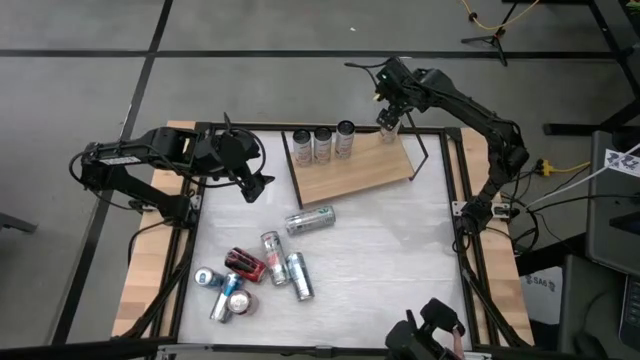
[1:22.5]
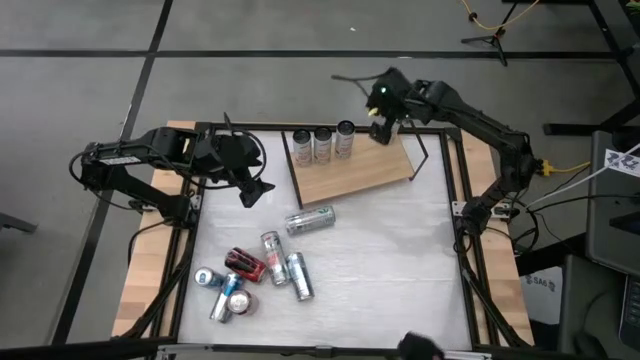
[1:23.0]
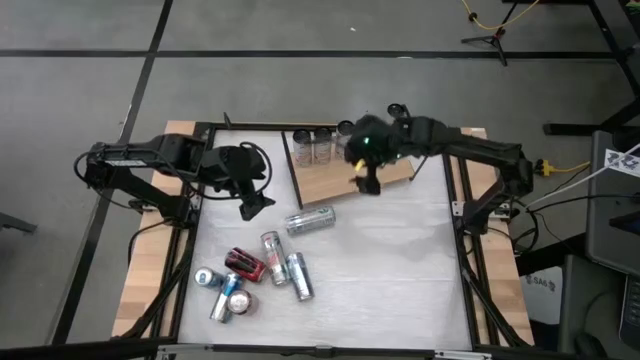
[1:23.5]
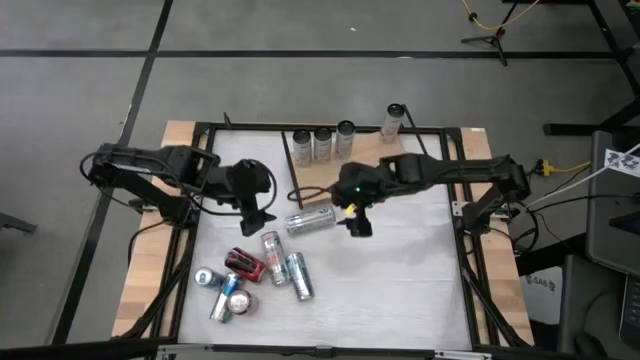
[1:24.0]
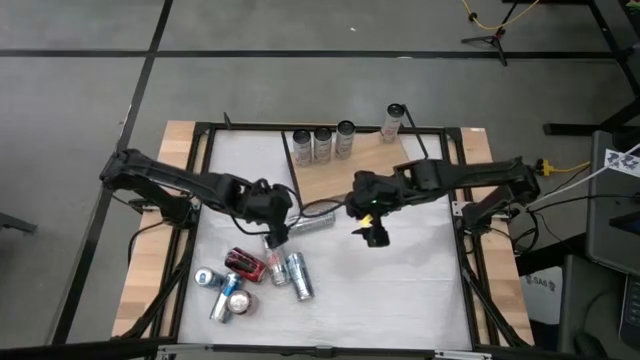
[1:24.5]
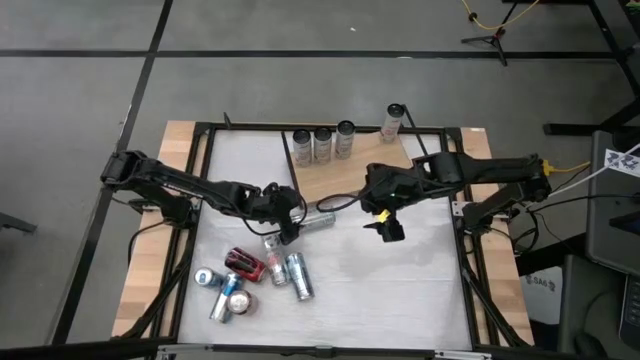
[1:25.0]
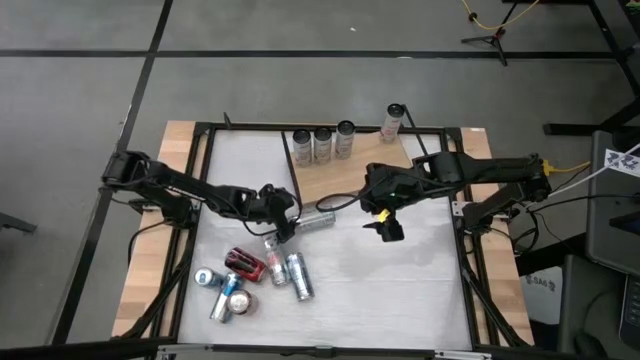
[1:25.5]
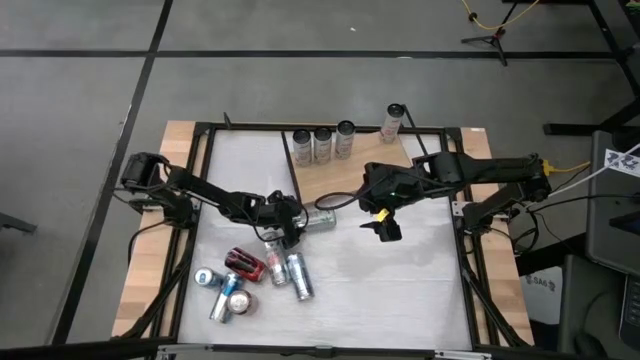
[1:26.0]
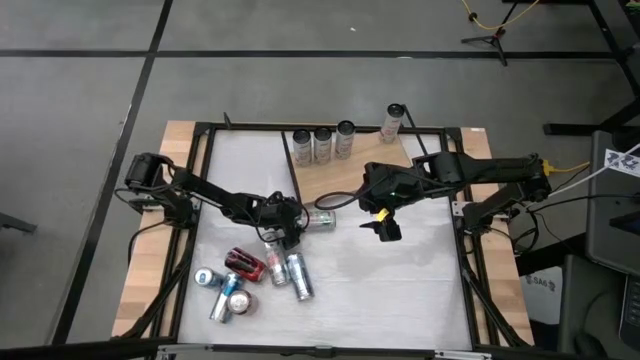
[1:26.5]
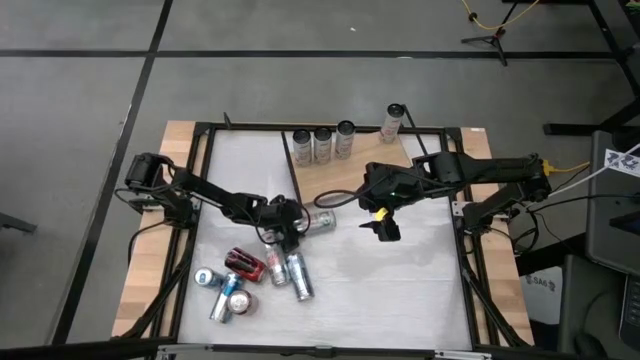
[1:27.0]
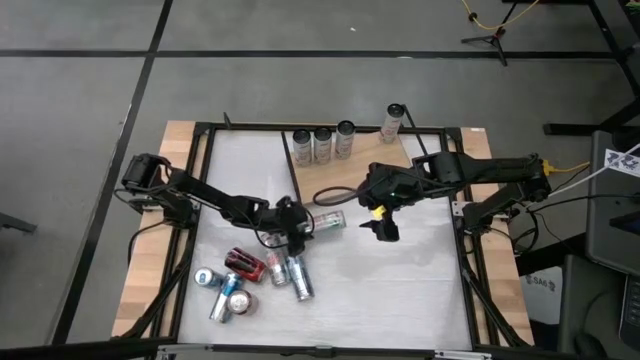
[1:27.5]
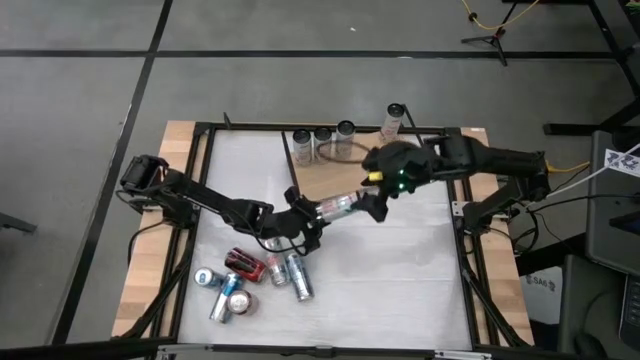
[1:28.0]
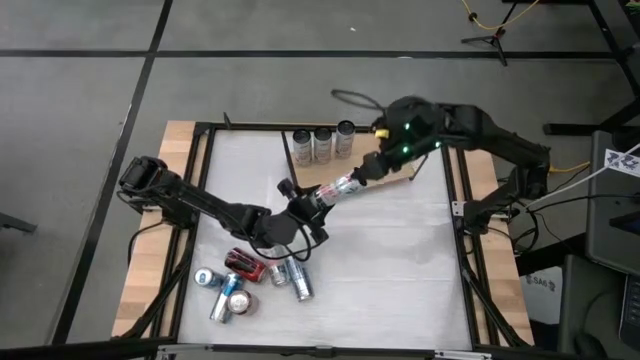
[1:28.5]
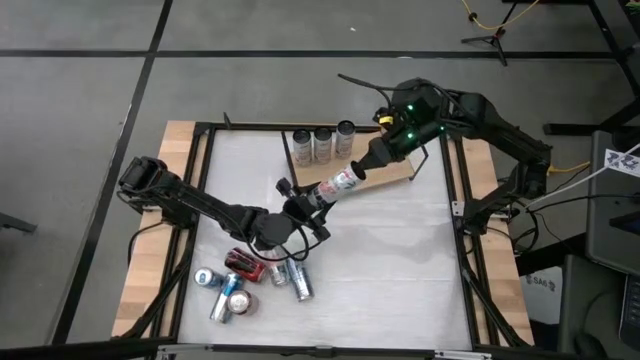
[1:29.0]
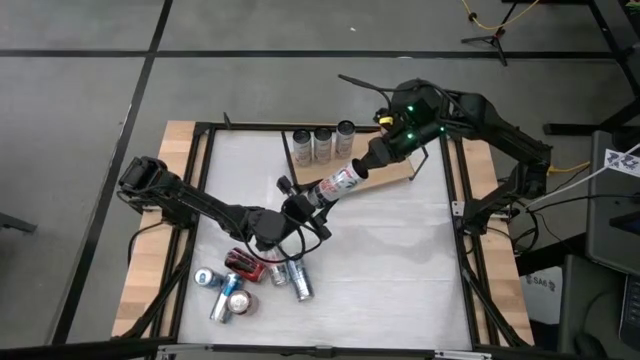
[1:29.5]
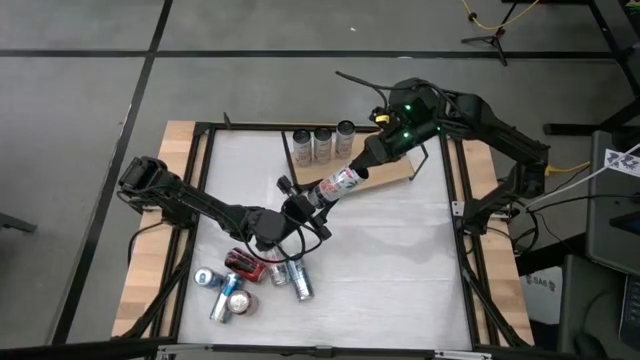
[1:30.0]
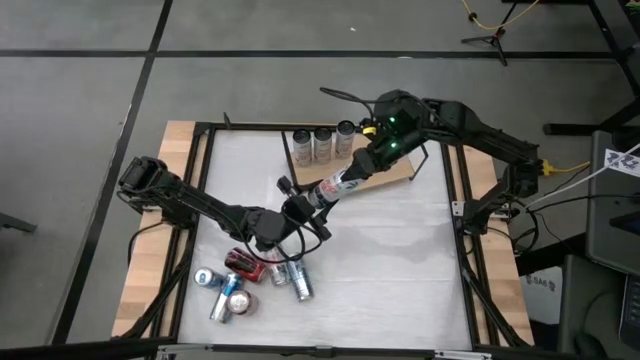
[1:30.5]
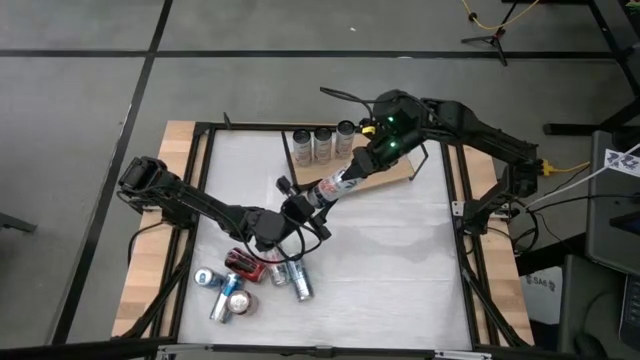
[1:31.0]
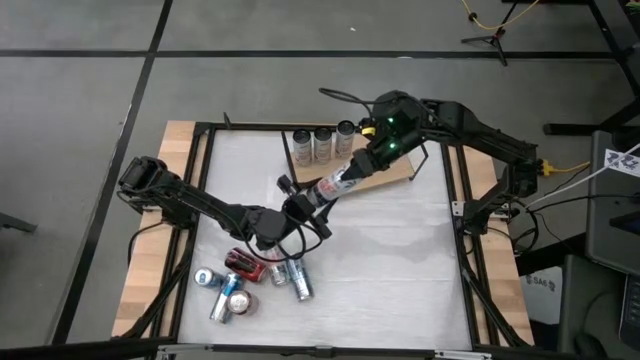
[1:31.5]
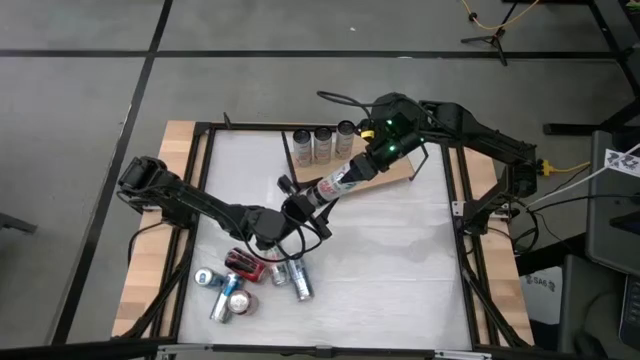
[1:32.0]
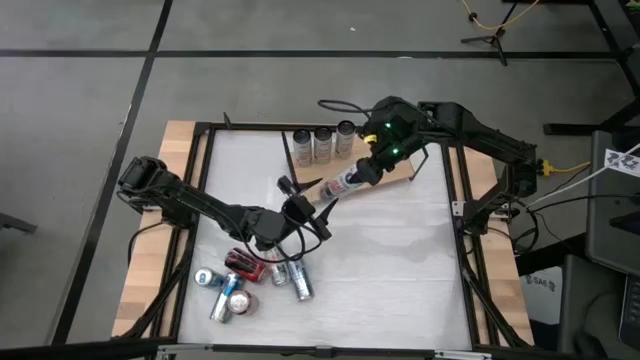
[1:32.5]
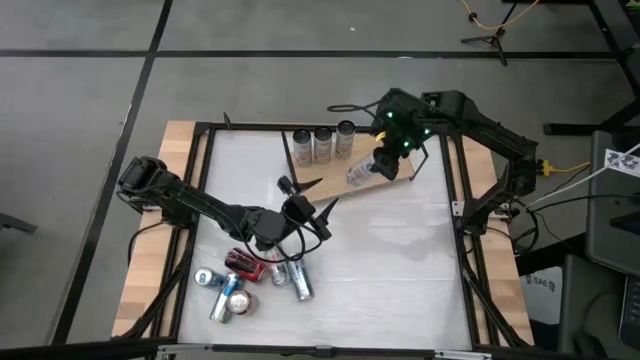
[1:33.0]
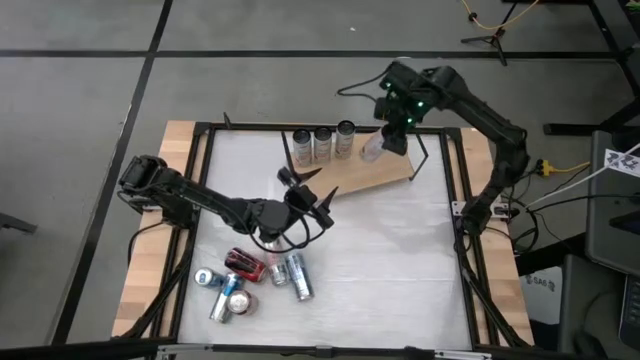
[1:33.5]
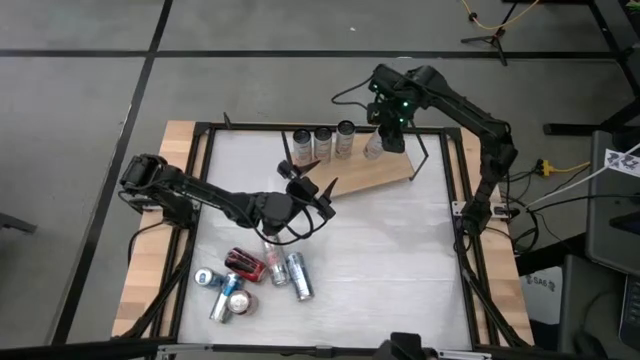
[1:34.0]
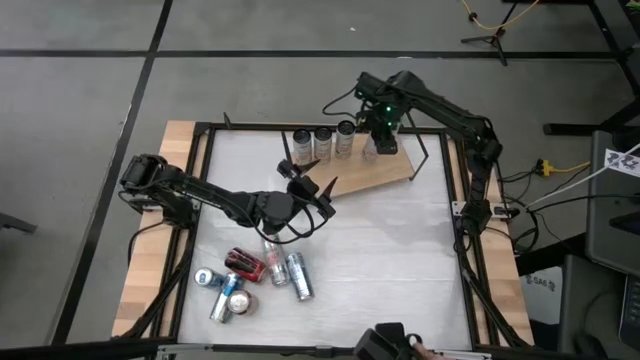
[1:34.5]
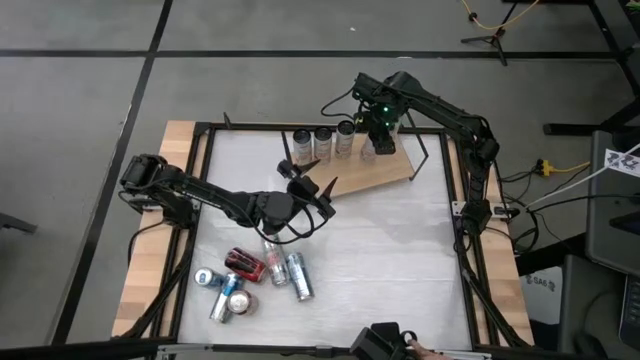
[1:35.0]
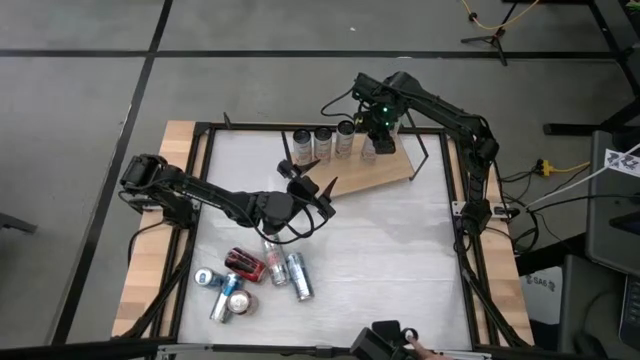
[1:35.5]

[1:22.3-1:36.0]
Task: Place canned beverage on shelf
Put the white pink soda can on the shelf aligned with the other white pink soda cans

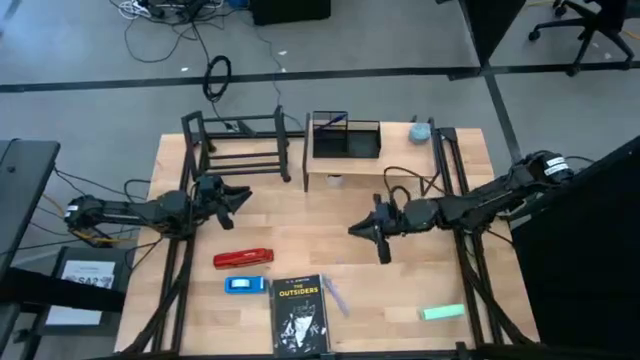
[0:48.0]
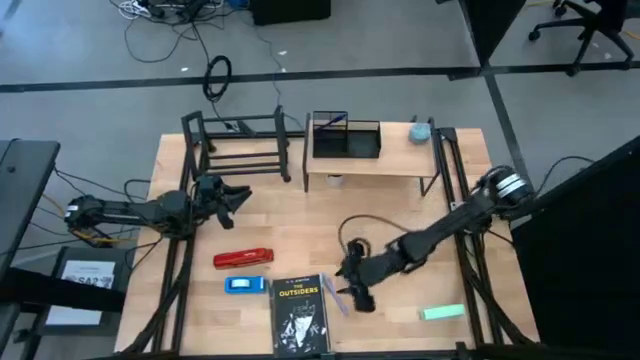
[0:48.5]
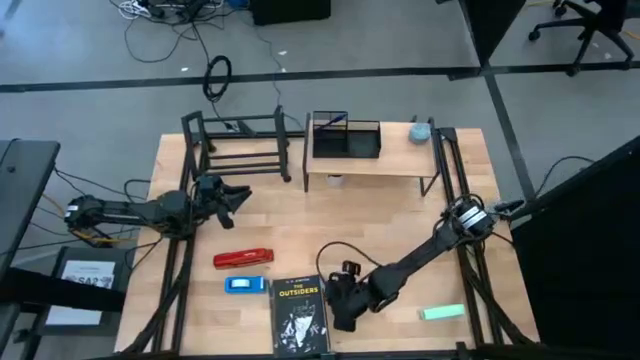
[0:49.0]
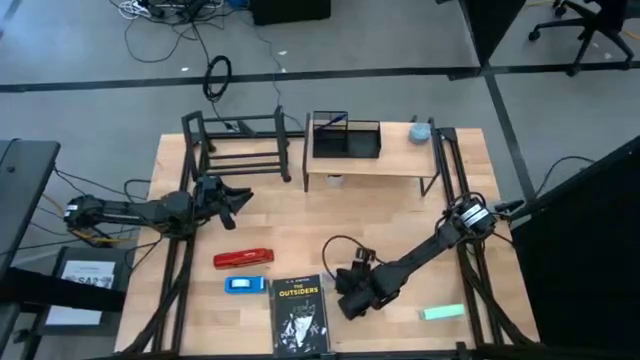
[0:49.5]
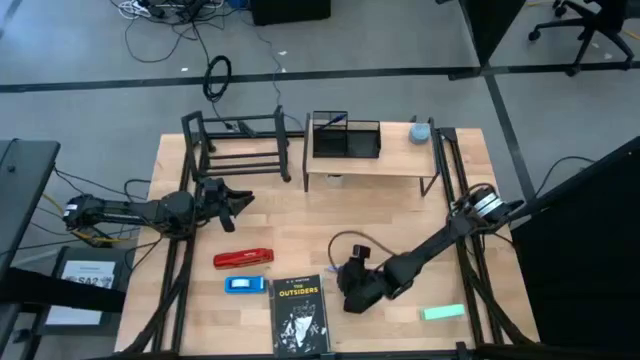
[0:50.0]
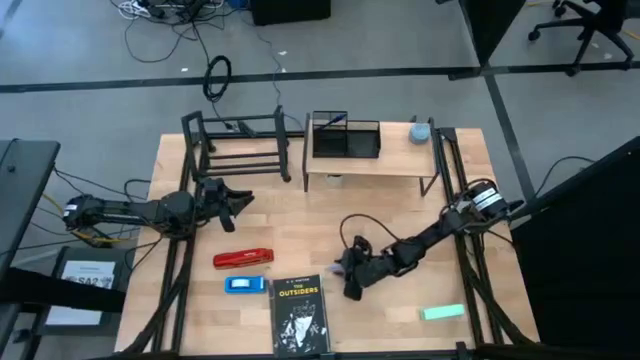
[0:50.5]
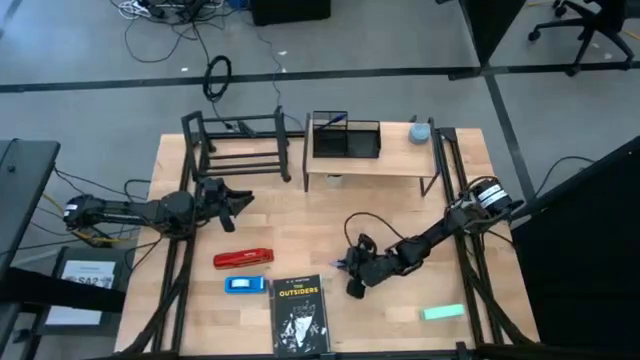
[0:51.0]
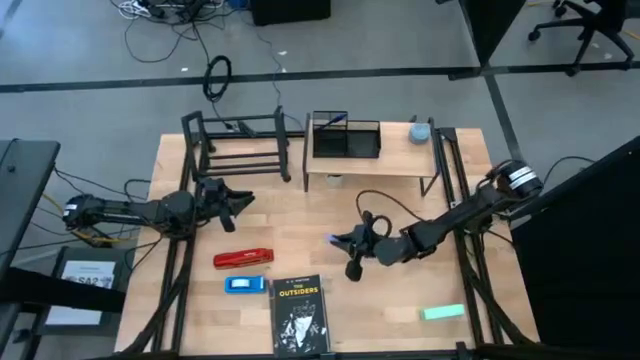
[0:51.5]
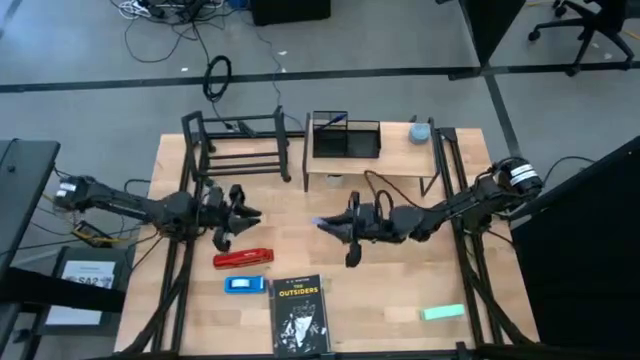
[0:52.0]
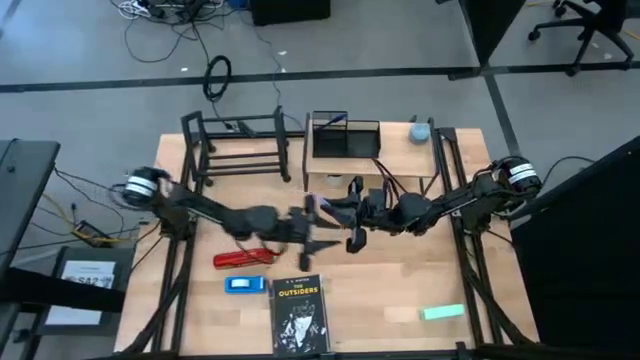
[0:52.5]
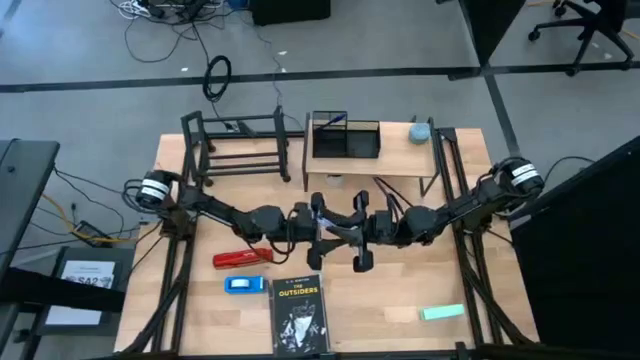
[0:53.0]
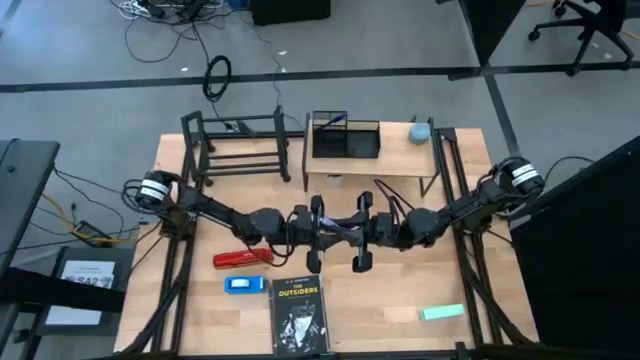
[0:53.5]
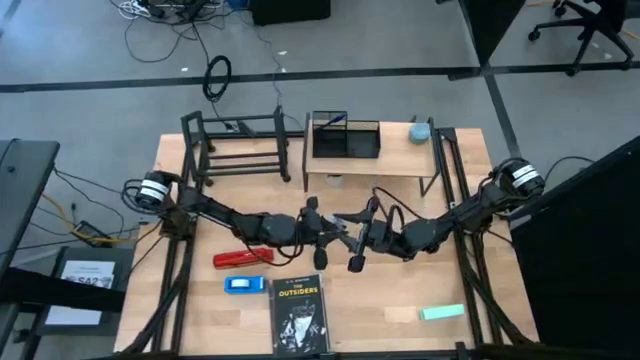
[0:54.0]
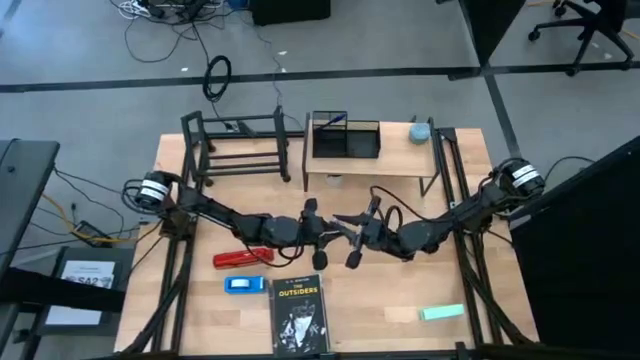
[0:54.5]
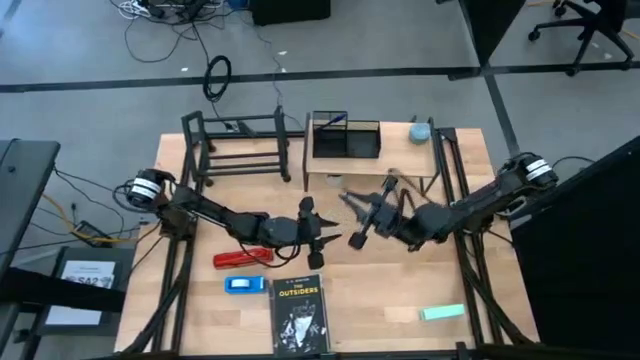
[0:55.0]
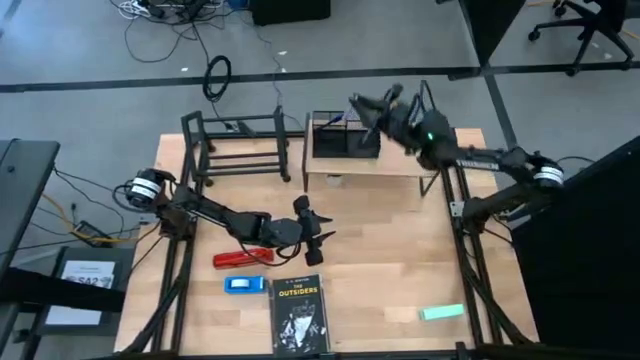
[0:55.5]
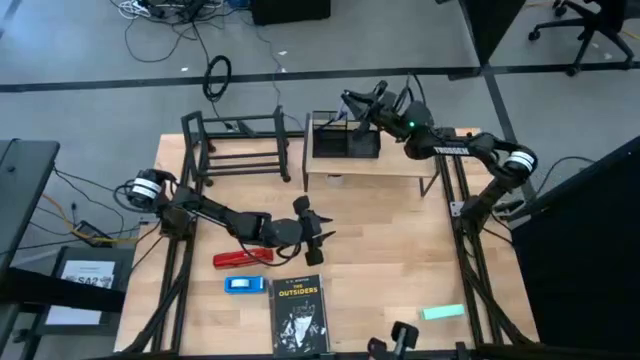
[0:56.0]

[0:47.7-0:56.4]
Task: Stock shelves
Put the violet pen into the pen holder of the black desk organizer
